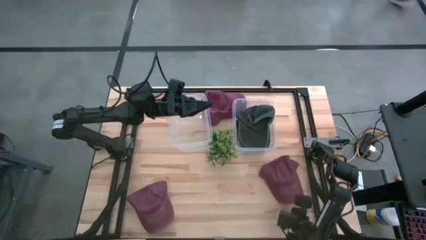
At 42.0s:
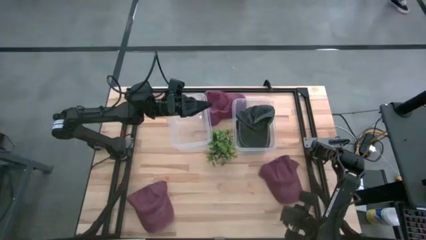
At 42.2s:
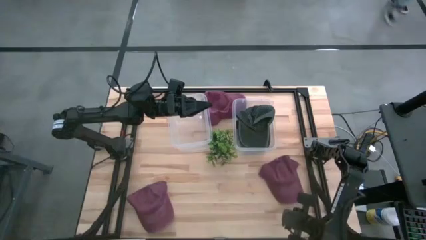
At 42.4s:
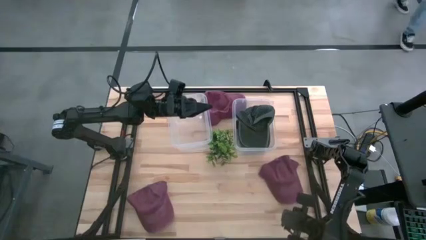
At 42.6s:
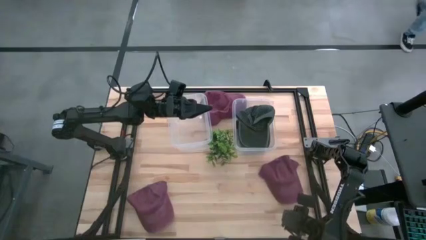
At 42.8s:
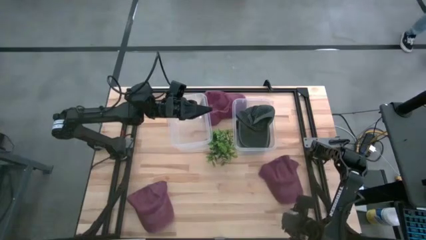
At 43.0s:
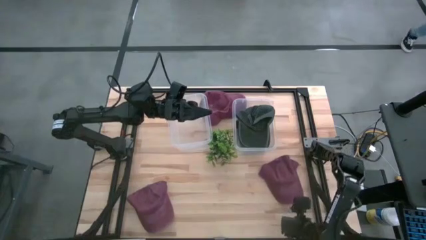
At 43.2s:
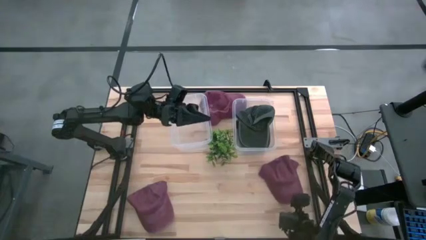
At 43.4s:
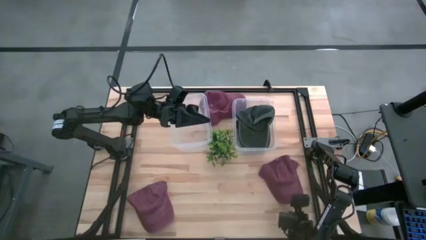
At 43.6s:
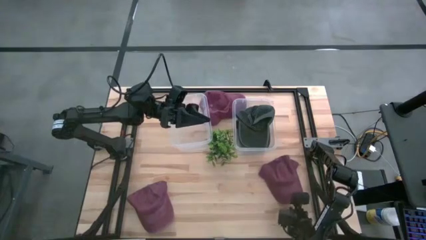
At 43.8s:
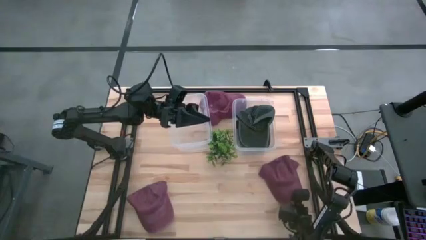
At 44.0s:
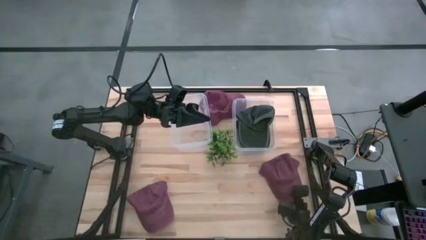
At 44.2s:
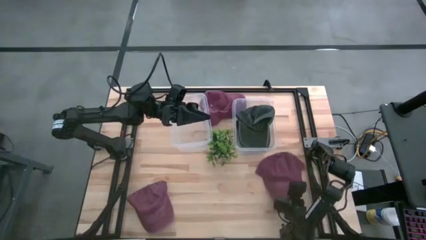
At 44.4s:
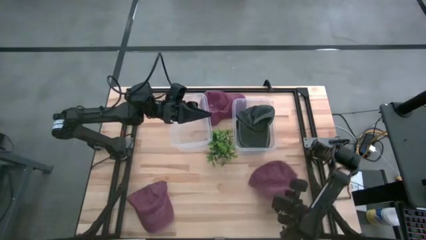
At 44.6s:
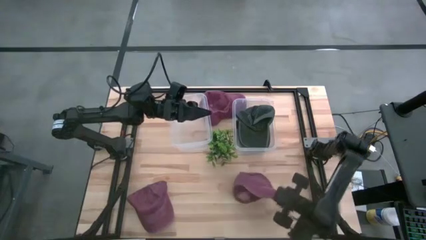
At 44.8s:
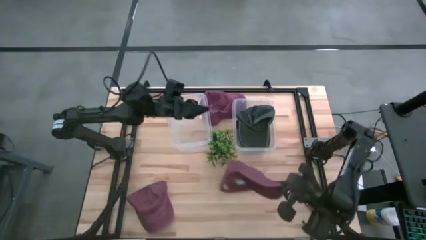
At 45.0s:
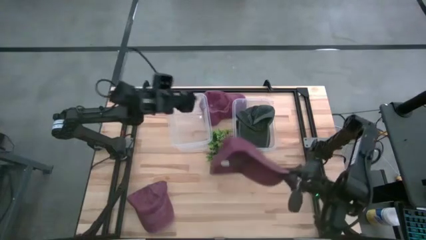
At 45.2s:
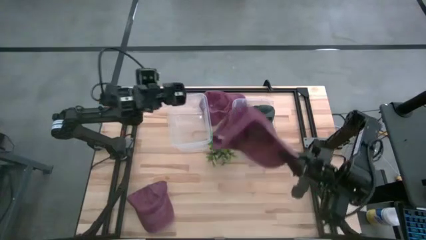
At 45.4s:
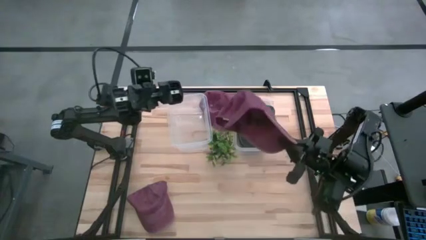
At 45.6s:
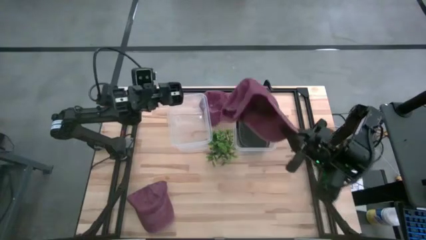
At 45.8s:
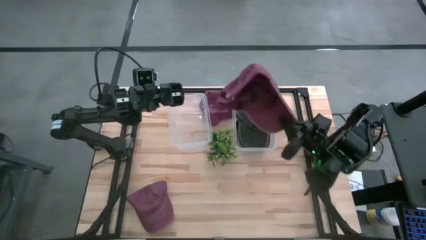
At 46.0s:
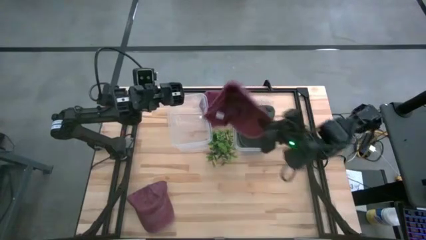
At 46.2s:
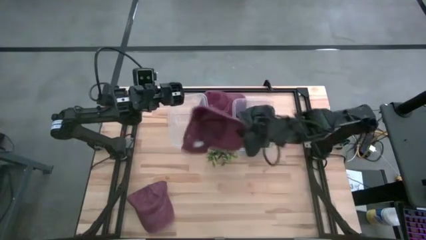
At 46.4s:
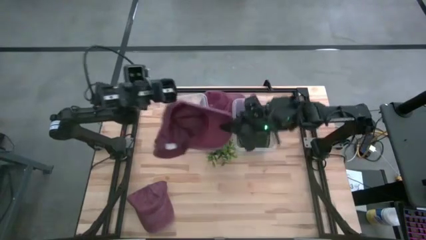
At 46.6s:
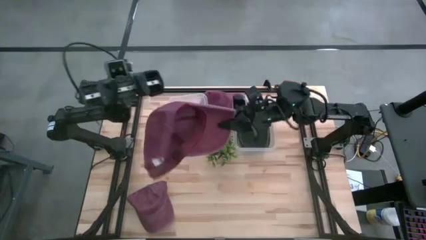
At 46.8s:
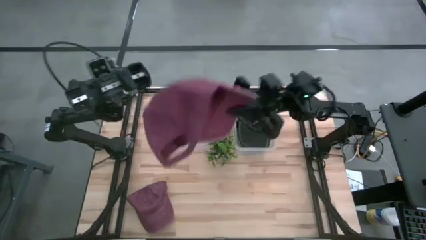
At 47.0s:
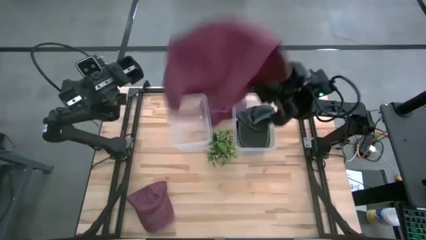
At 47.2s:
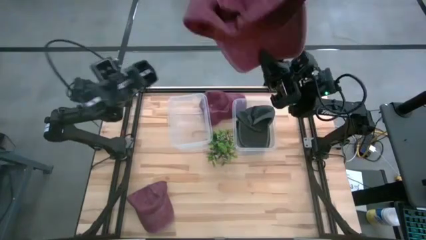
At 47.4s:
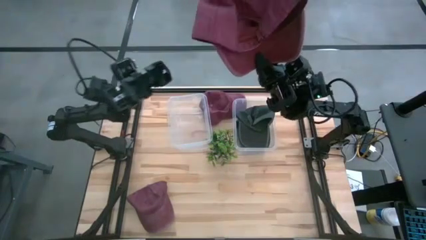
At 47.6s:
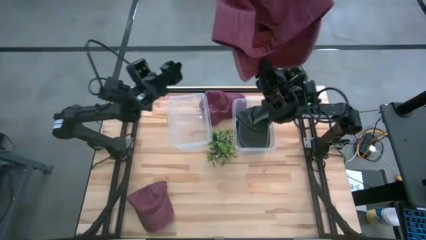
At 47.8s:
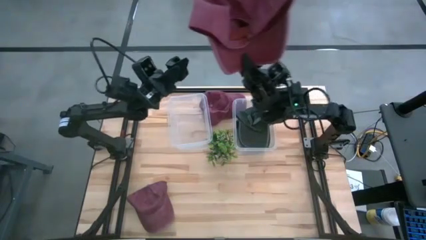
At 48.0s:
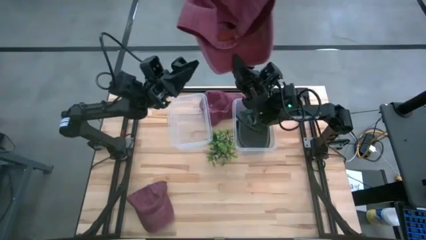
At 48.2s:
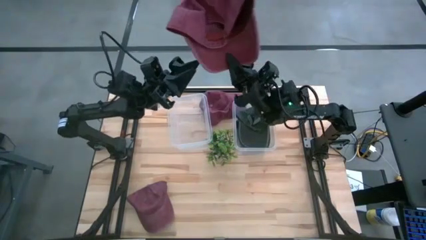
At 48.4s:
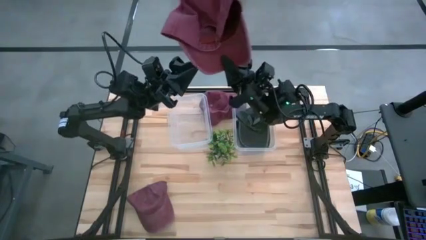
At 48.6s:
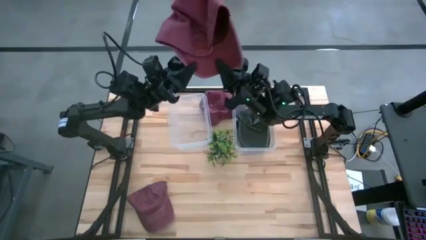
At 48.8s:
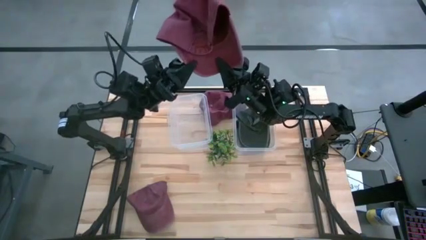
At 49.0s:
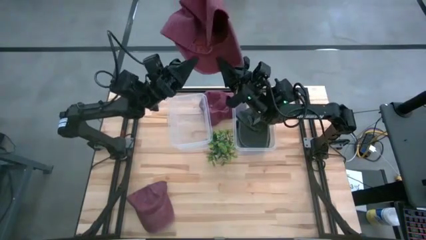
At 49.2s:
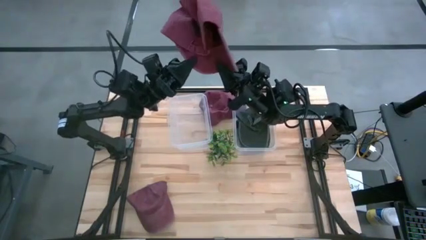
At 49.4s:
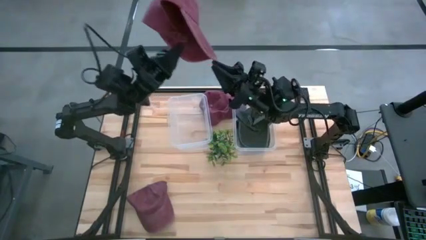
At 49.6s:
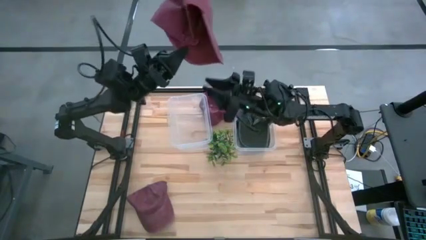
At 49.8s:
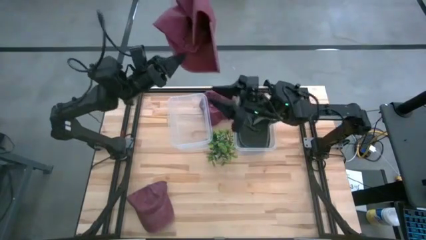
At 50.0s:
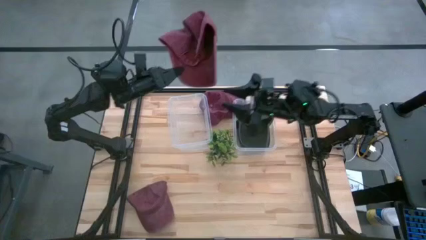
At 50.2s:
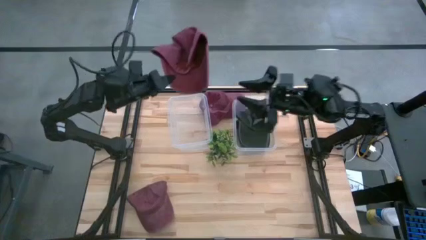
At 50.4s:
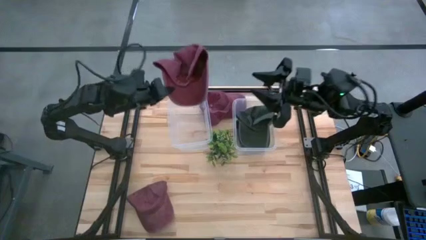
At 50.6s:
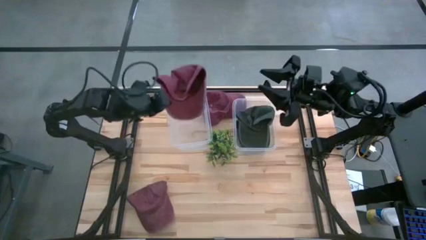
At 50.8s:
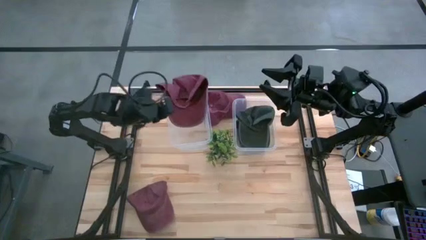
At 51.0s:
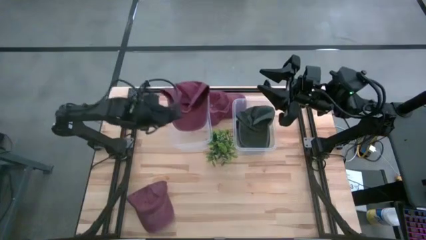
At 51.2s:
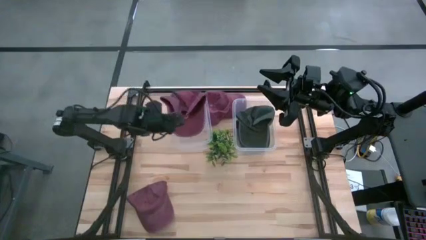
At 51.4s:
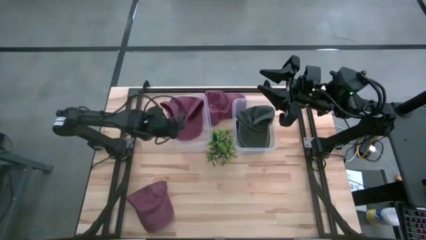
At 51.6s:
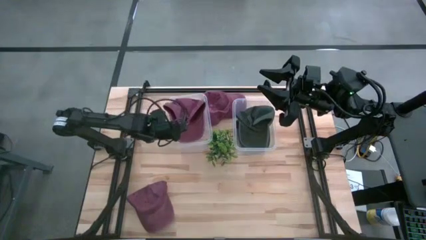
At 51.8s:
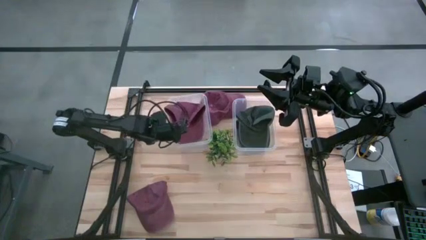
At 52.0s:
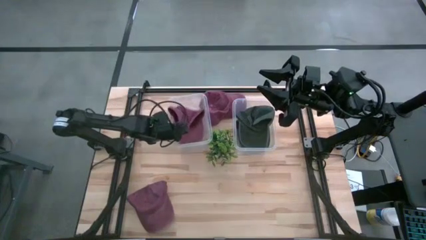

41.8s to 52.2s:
Task: Pick & Place hat
Put the bottom right red cap into the left transparent bin

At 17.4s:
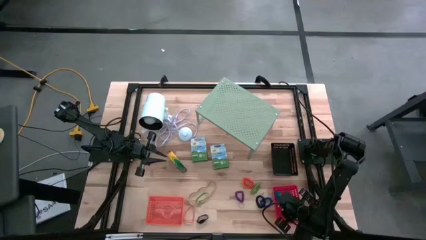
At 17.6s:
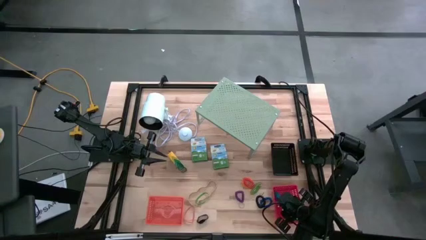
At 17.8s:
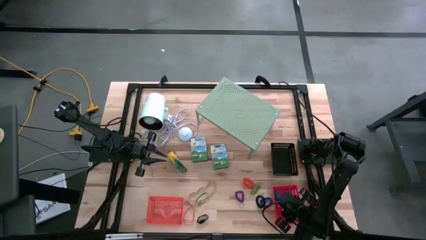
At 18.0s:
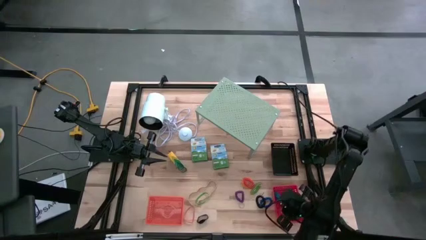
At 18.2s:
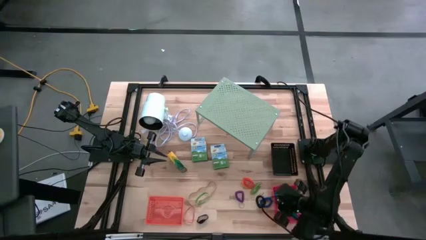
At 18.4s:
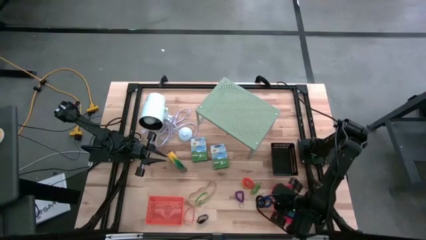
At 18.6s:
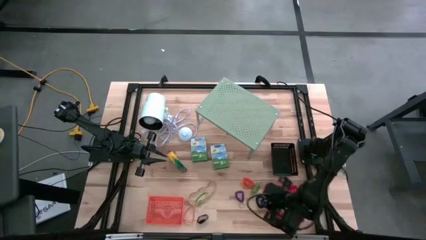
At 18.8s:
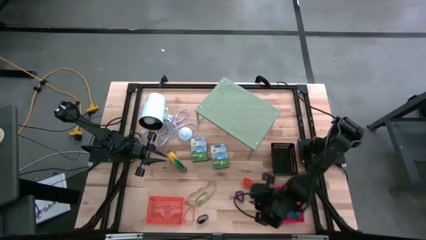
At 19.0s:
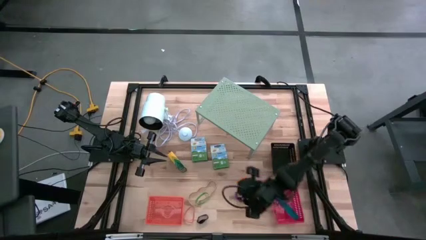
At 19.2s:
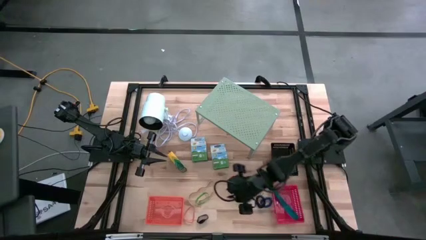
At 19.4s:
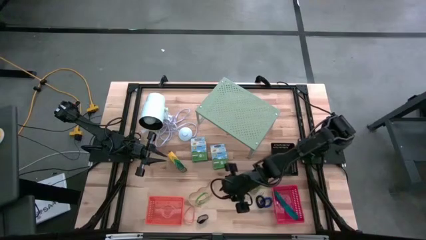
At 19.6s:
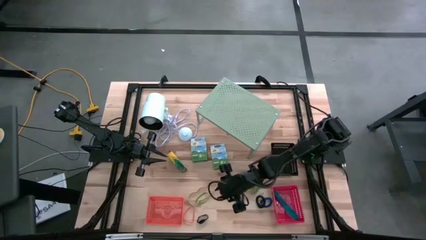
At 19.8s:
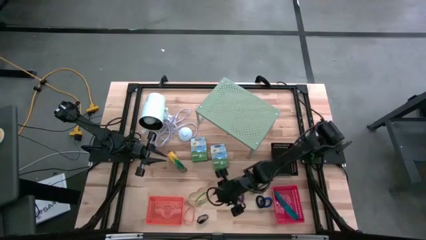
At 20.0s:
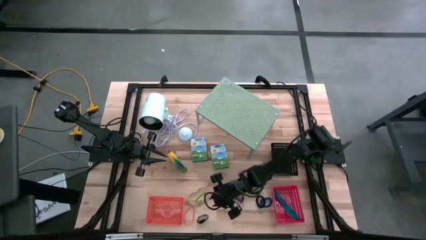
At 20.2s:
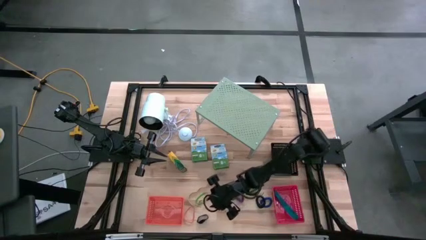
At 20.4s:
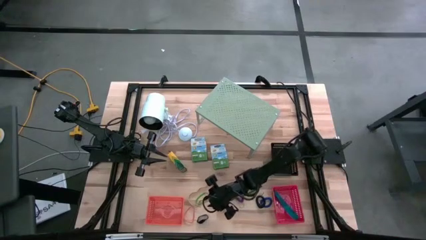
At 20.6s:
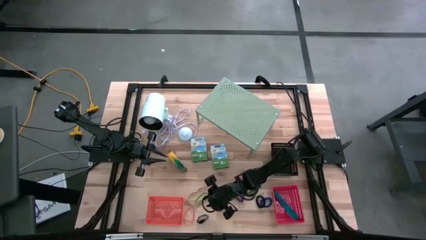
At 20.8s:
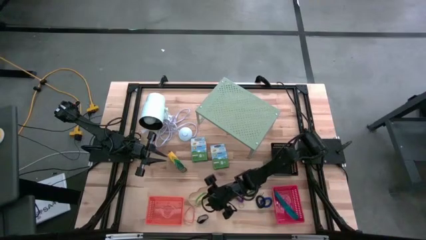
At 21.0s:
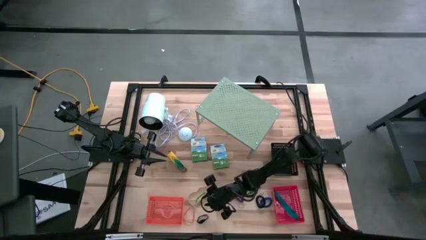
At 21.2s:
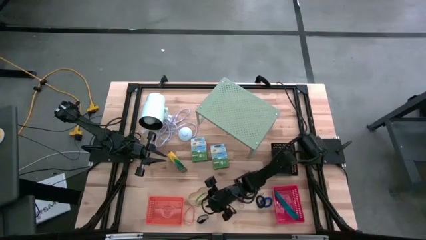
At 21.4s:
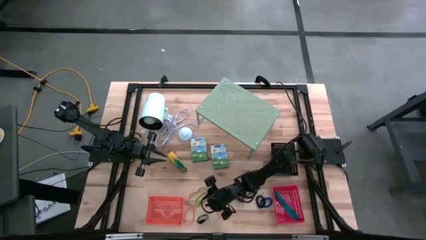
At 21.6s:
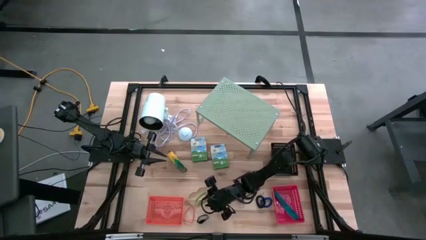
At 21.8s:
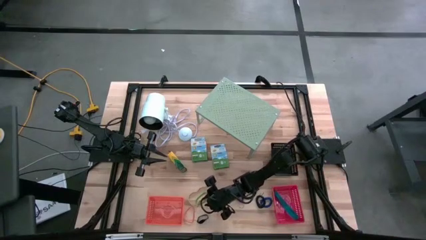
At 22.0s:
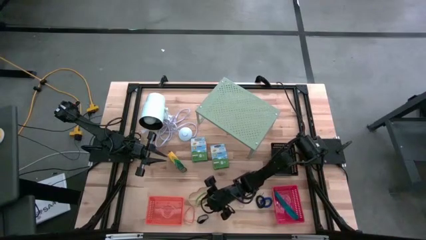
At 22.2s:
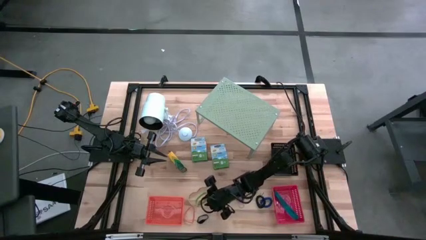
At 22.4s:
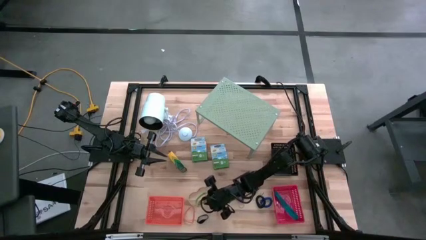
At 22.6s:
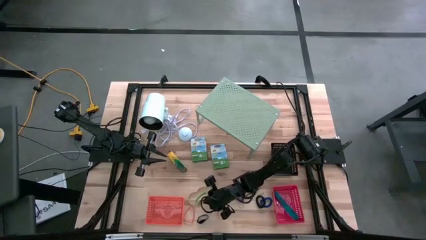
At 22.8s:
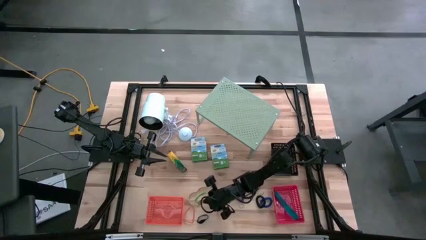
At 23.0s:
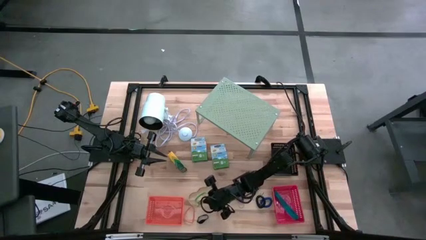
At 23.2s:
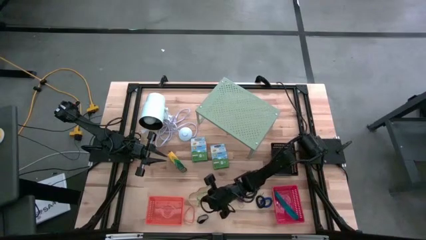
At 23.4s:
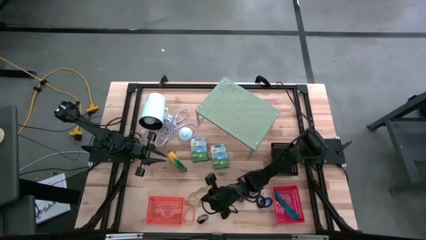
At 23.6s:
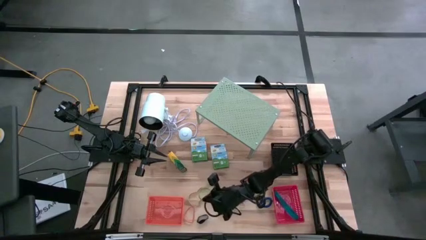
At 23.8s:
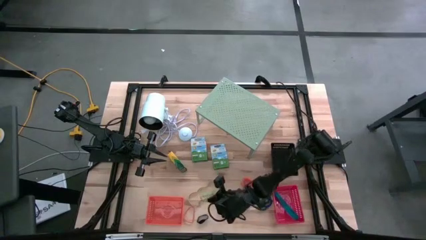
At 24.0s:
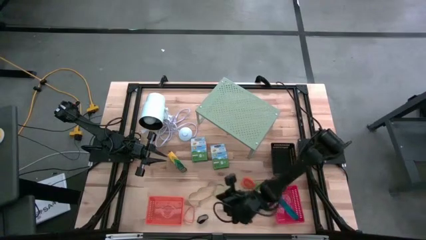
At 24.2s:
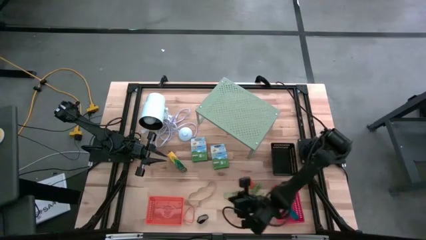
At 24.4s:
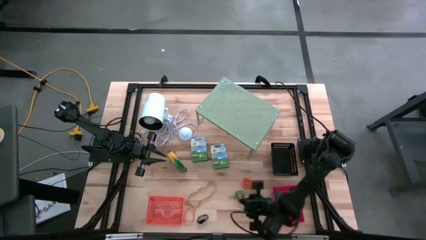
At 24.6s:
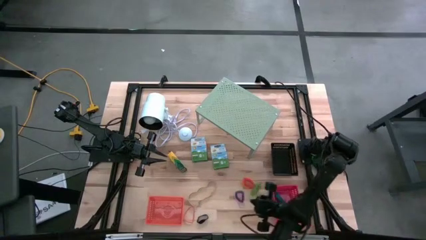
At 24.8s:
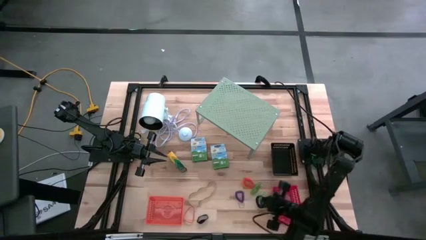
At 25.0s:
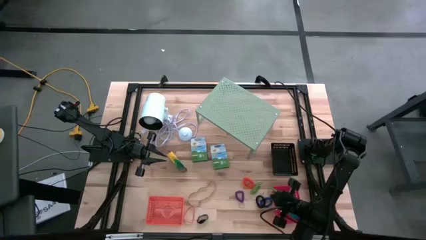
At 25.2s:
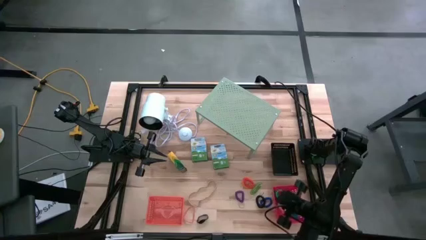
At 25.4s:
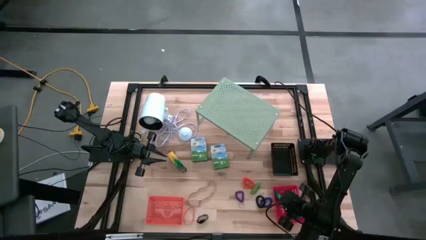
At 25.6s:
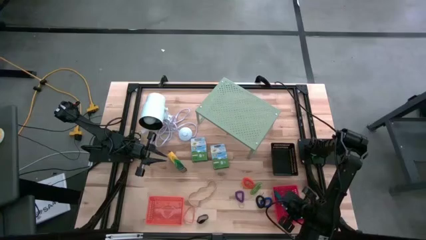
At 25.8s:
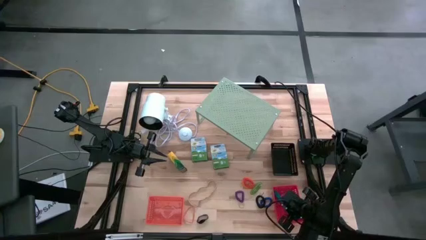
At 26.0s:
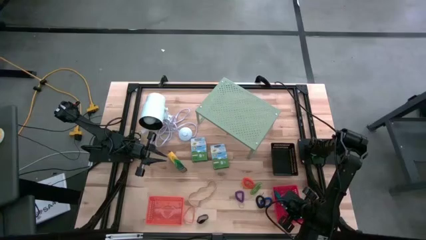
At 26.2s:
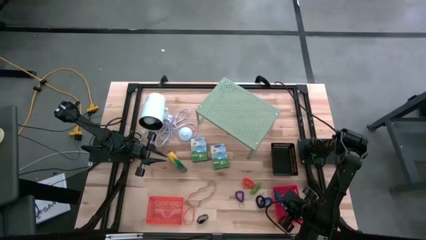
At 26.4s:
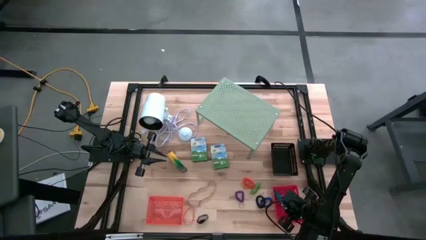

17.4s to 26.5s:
Task: Pick & Place Office Desk Supplies
Put the green rubber band into the red bin
